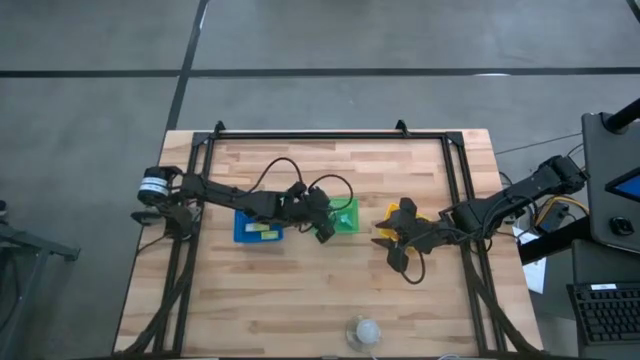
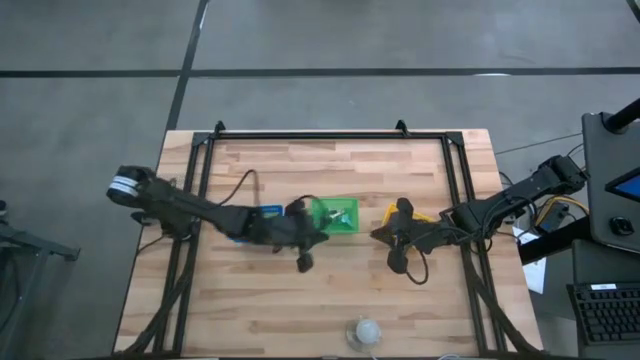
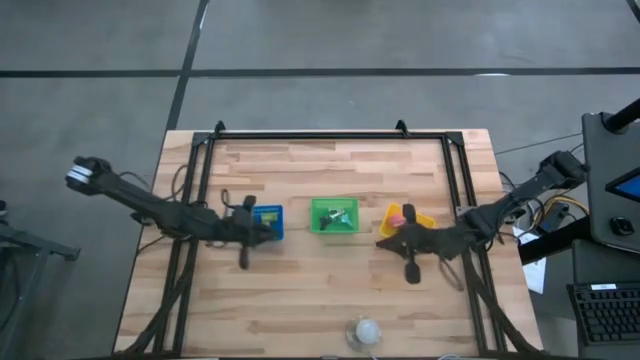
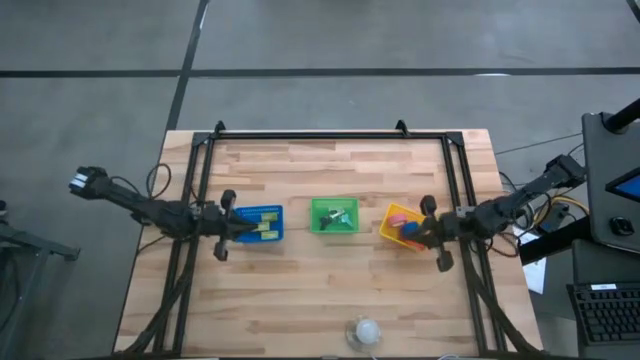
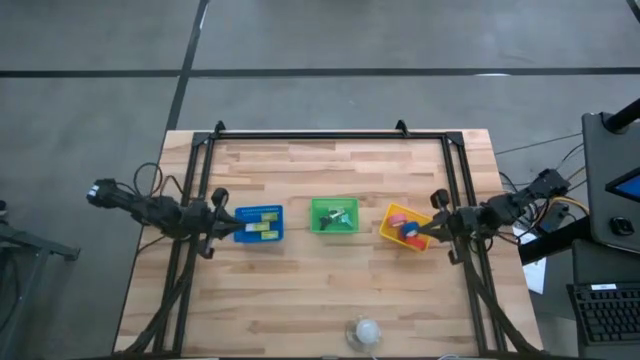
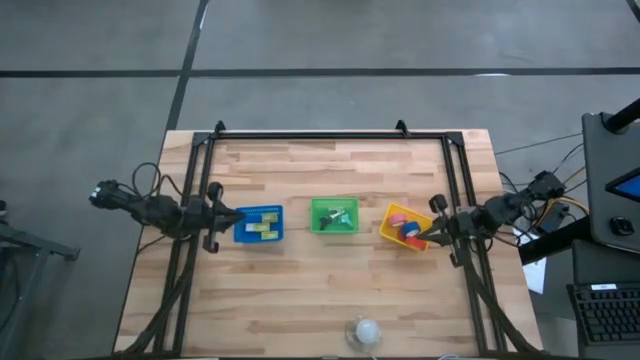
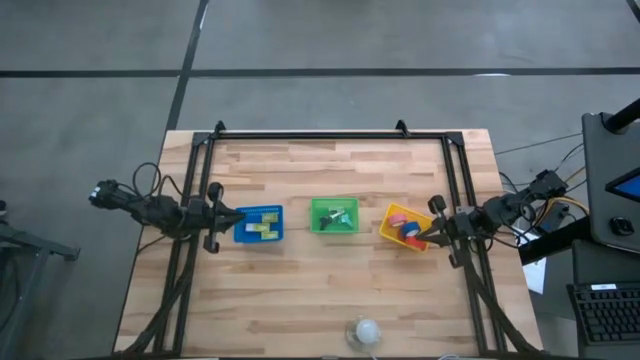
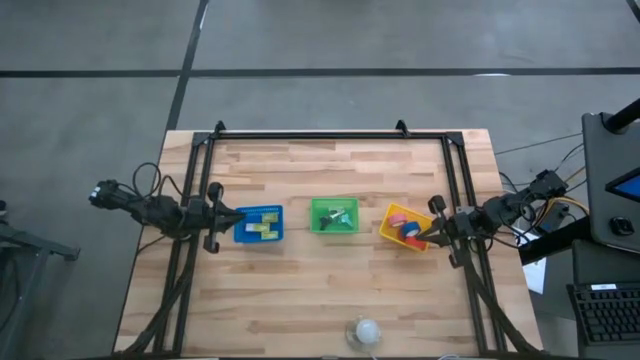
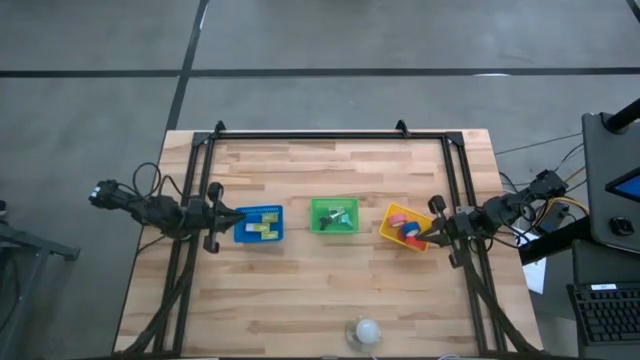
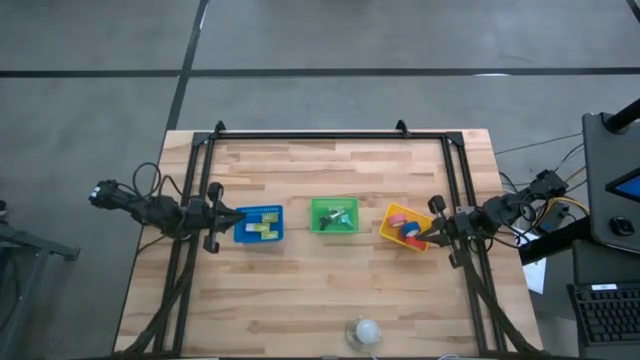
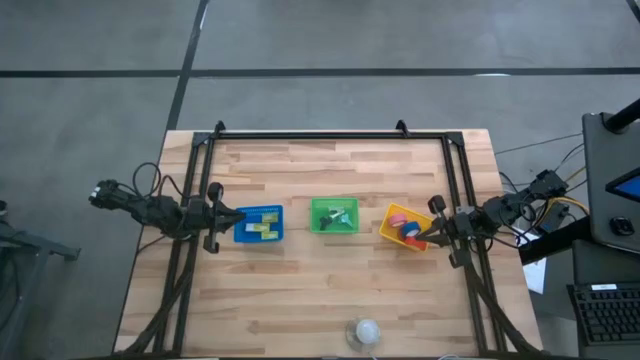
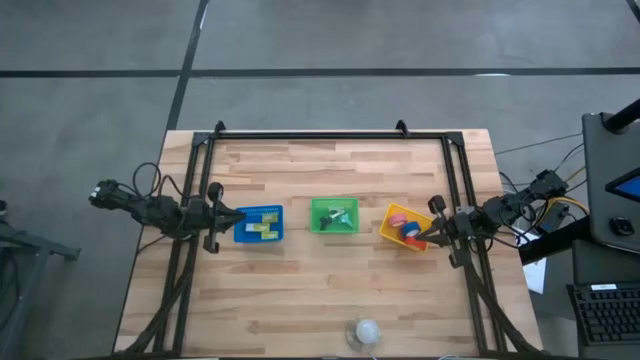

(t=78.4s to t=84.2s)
Task: Pick and place Stapler, Stapler remover, tape
Return to Home Position

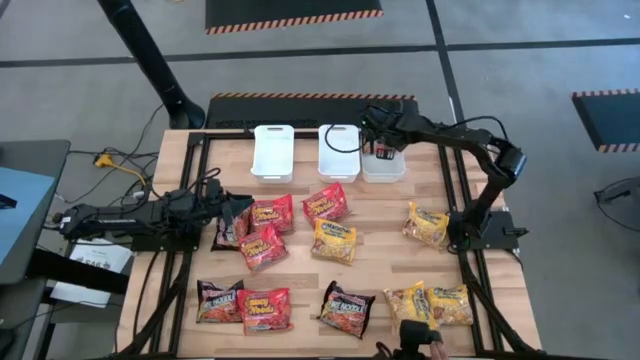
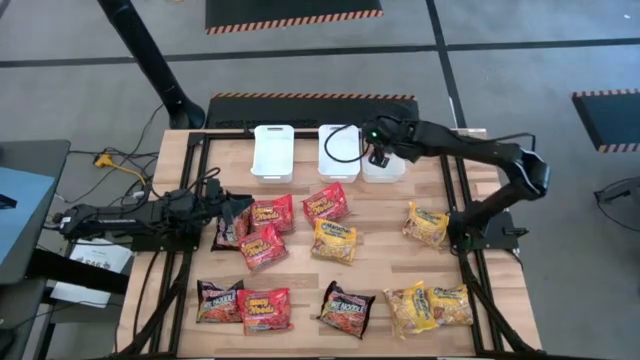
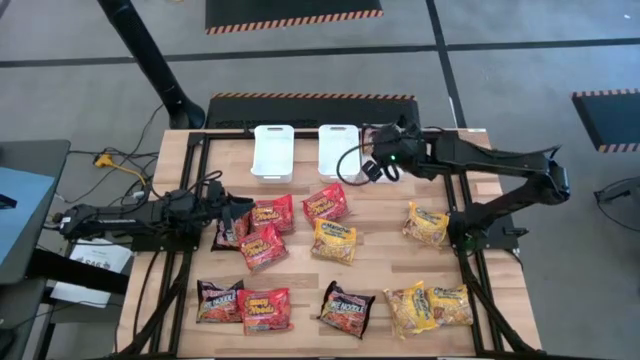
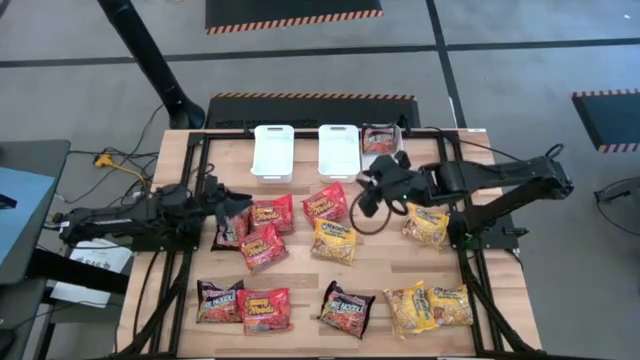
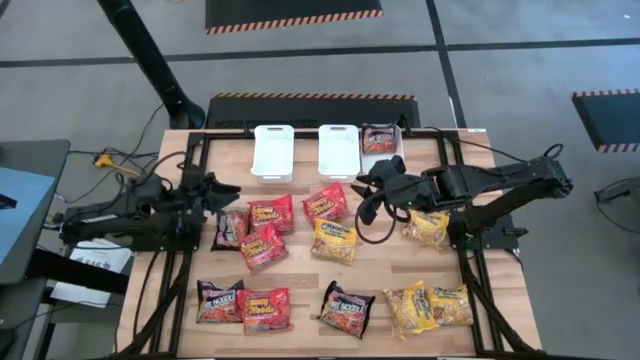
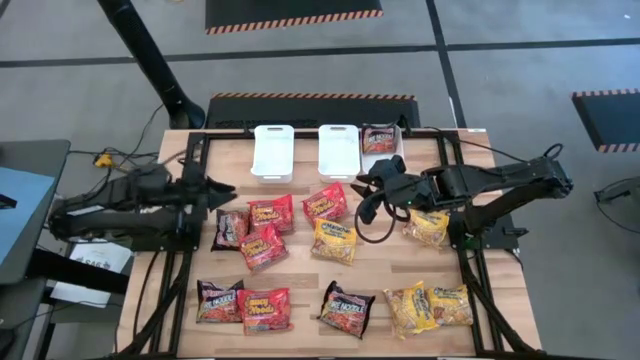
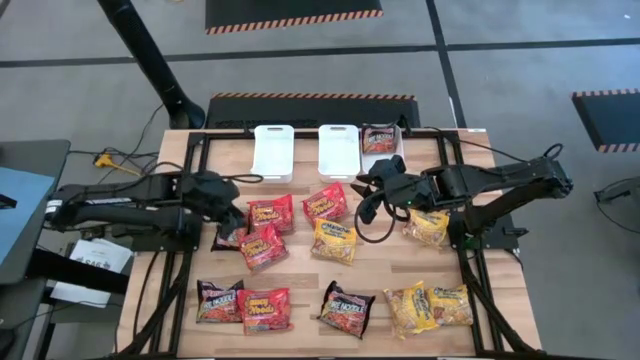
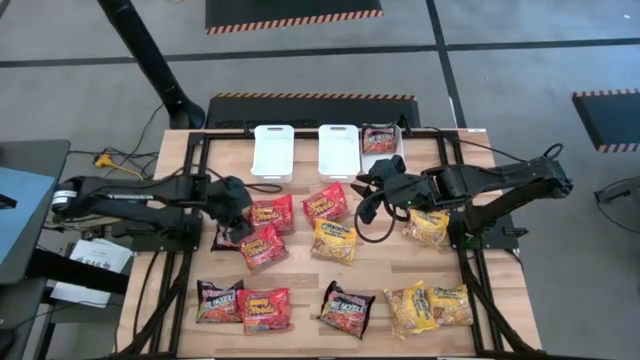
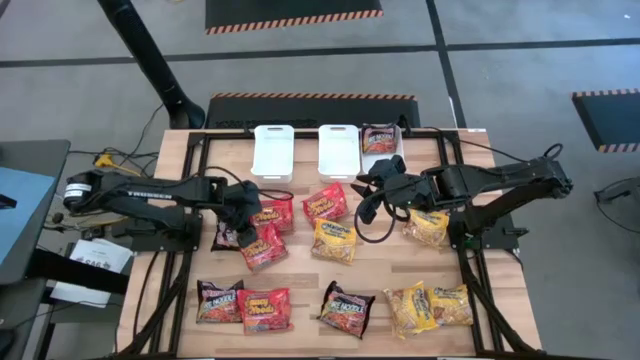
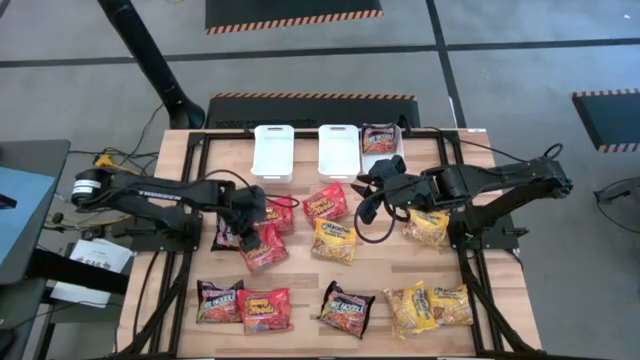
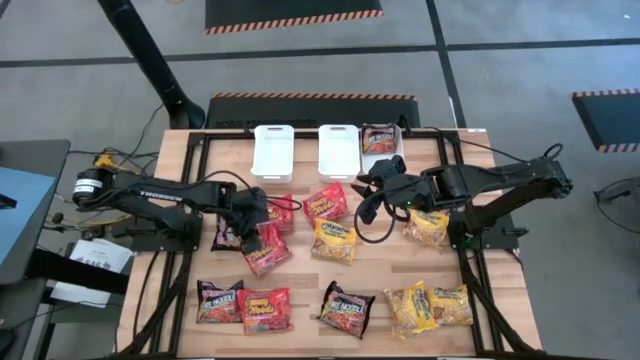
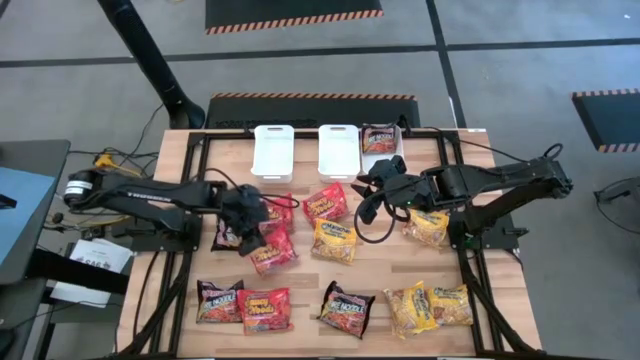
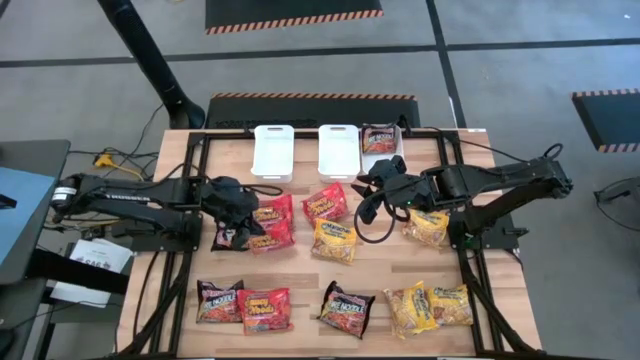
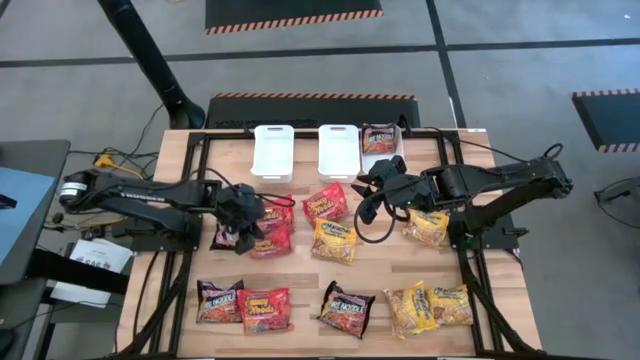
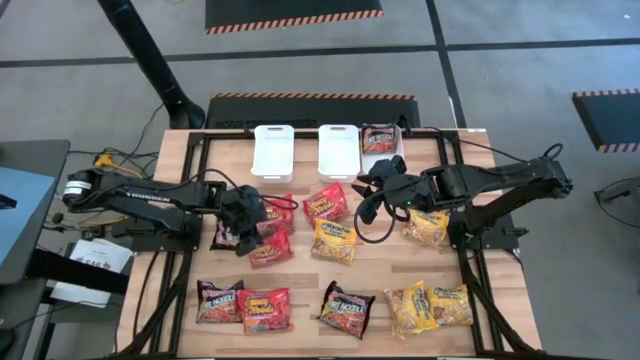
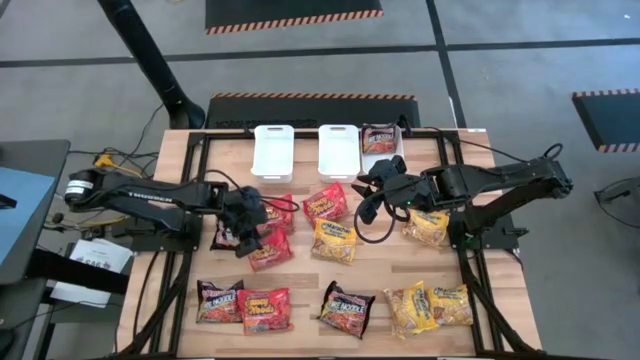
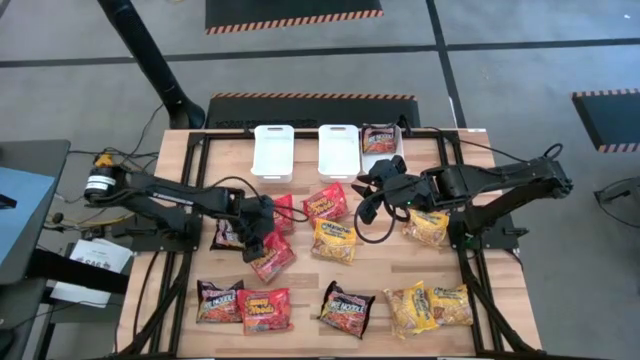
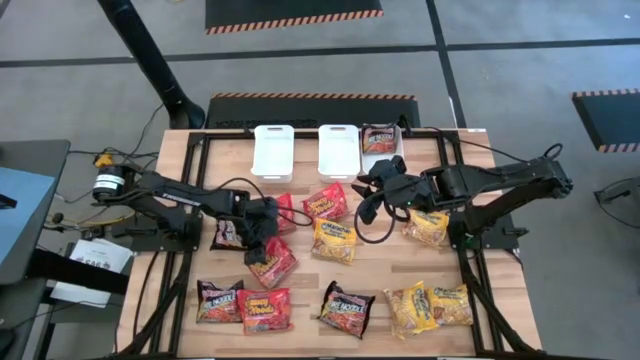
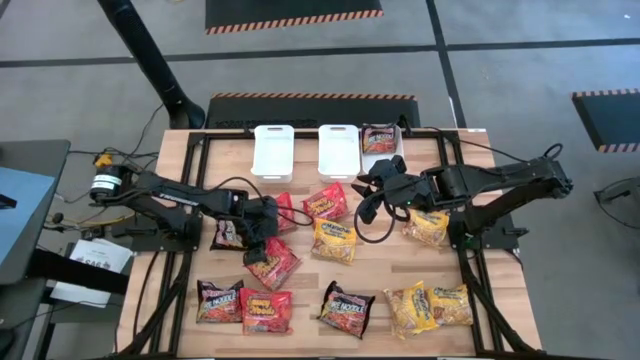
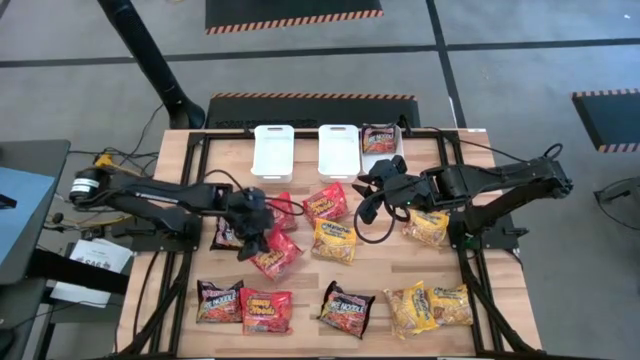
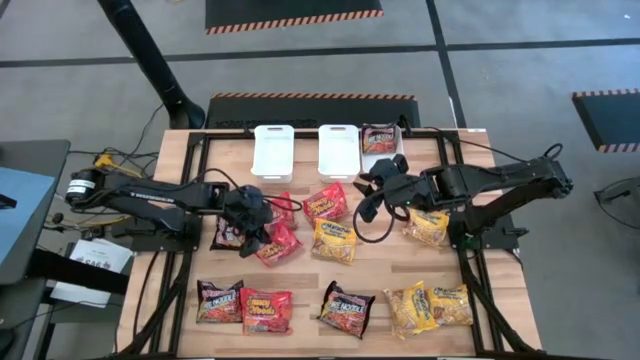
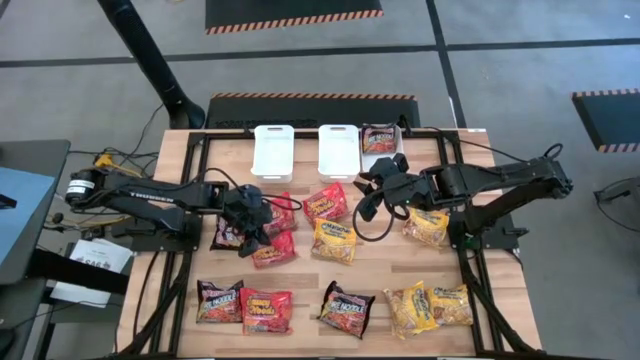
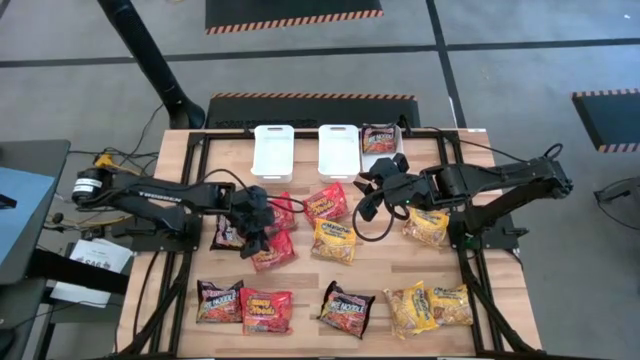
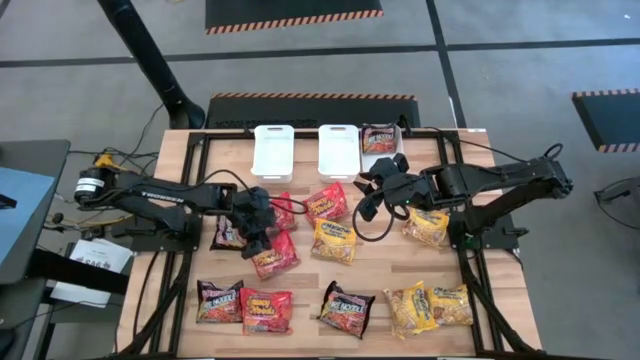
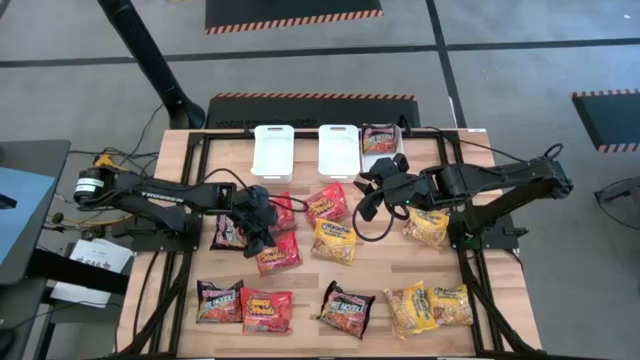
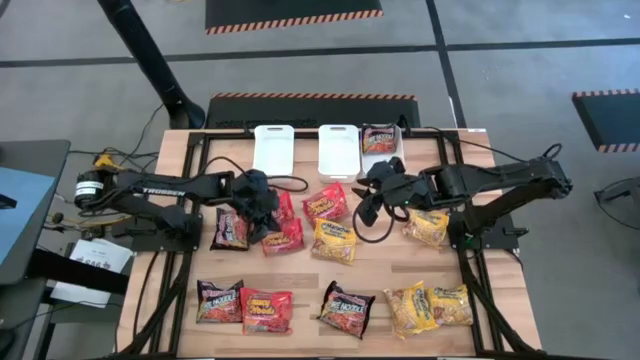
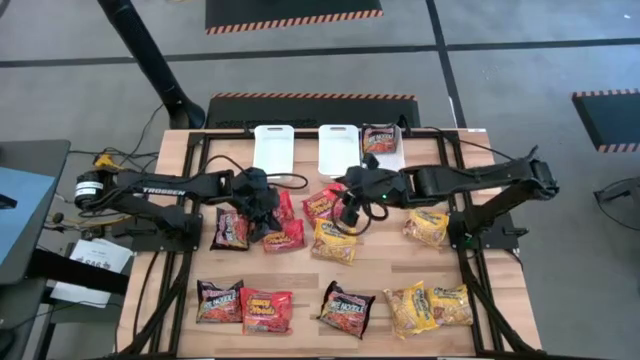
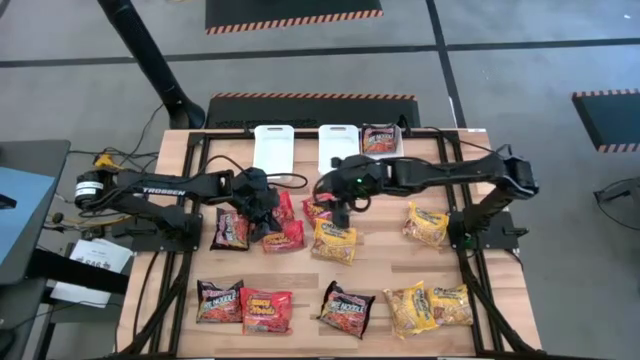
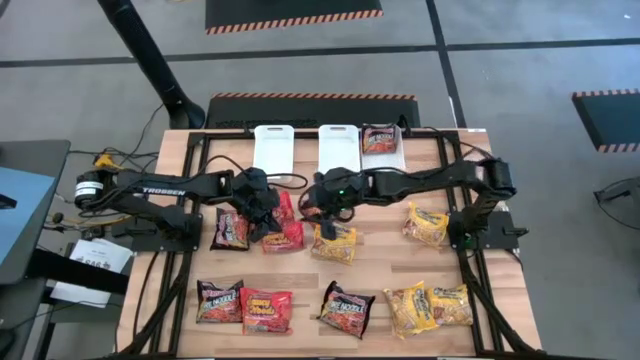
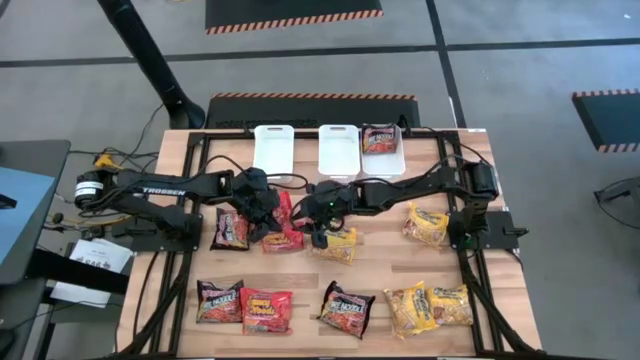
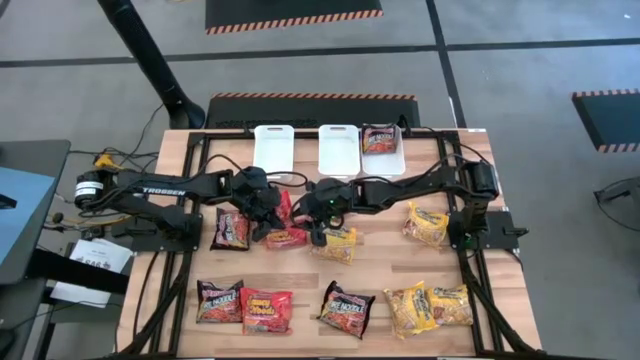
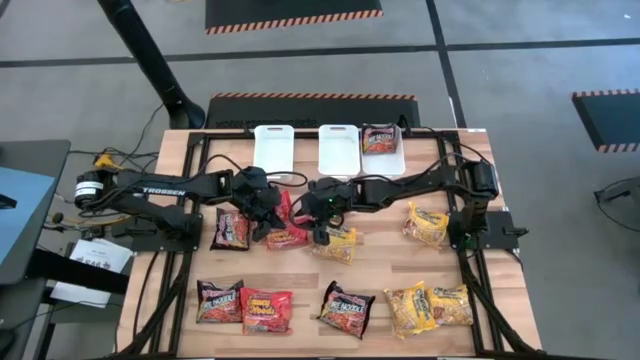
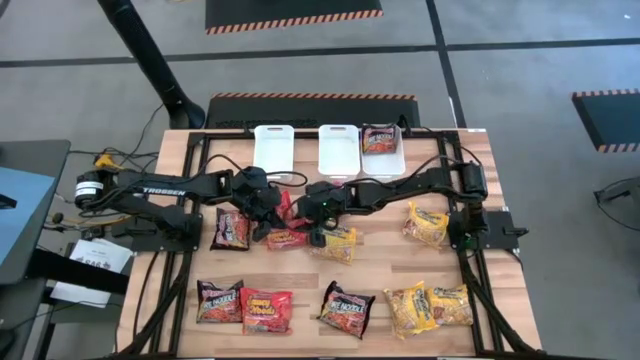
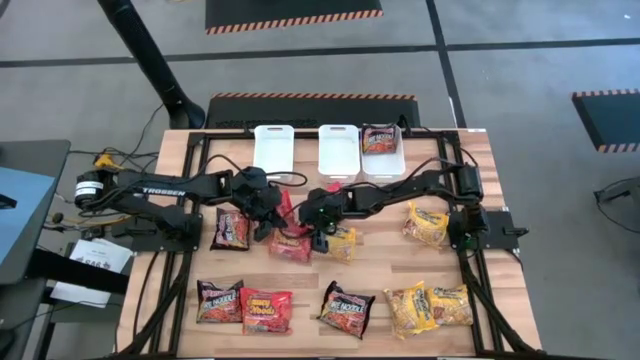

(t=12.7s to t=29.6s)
Task: Sort Maruchan noodles
Put the orange noodle pack into the middle white bin
